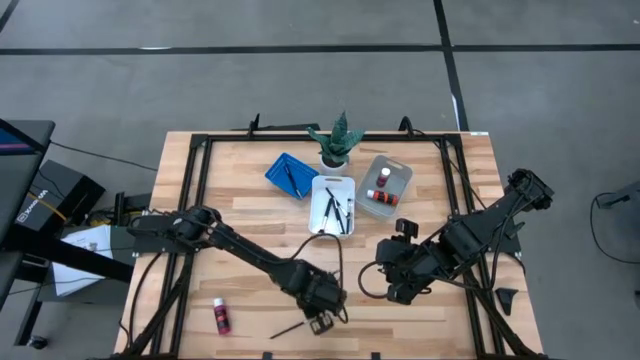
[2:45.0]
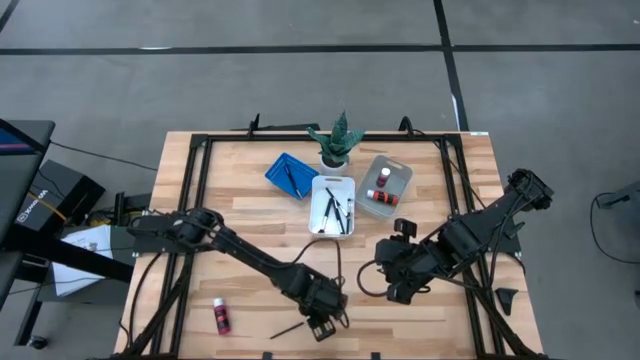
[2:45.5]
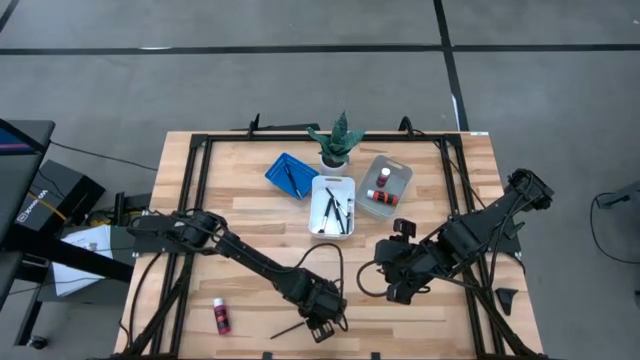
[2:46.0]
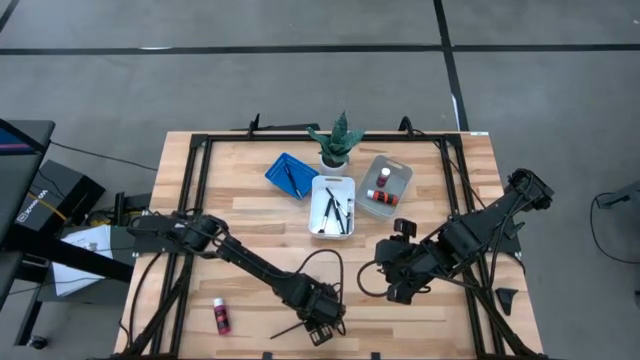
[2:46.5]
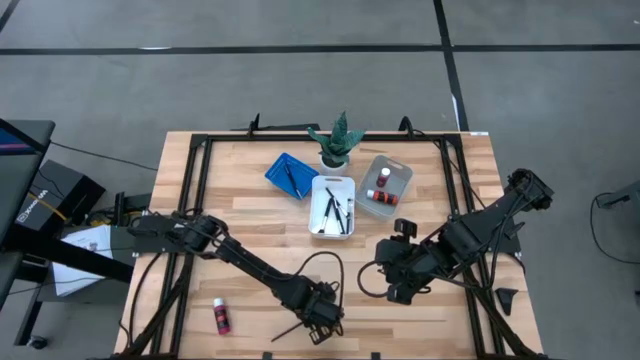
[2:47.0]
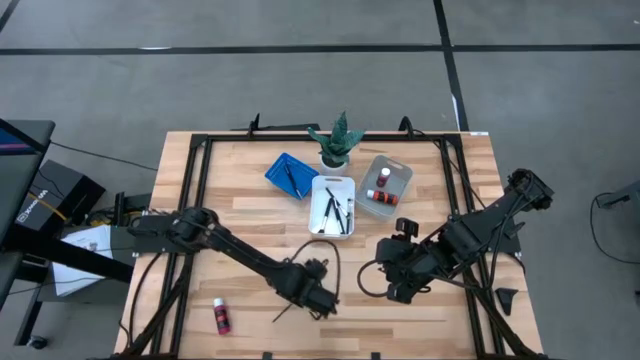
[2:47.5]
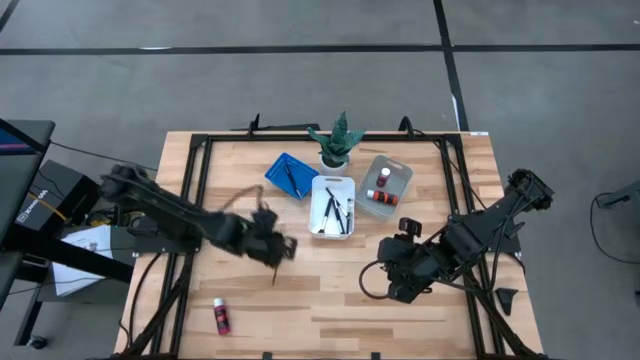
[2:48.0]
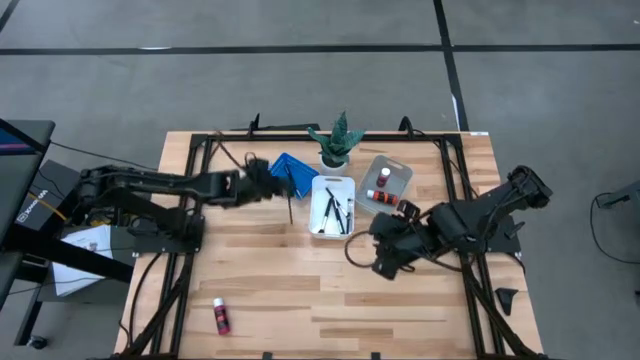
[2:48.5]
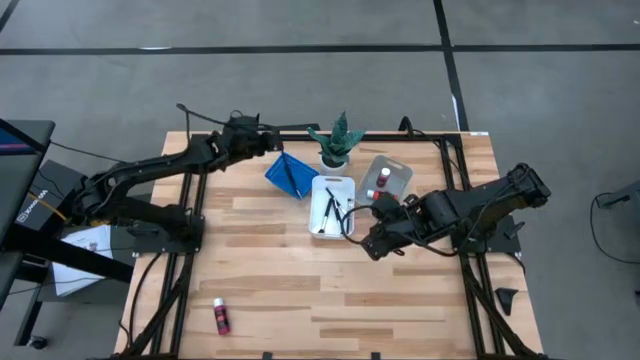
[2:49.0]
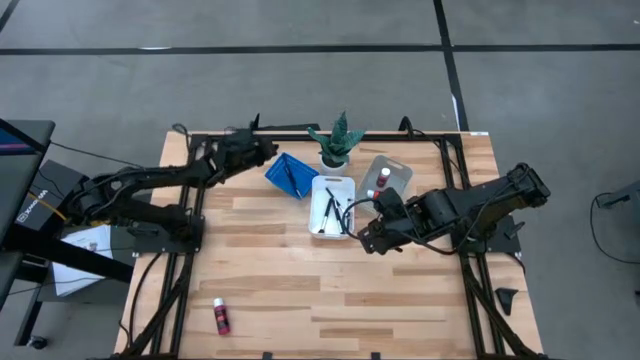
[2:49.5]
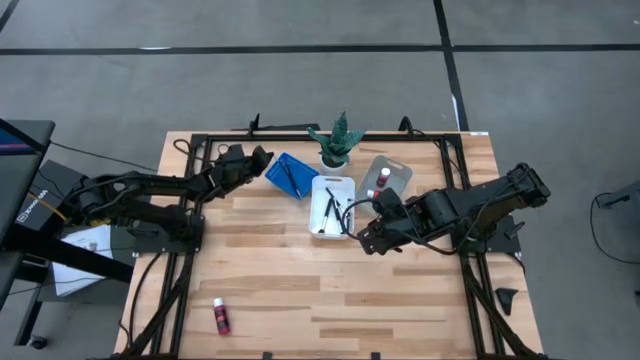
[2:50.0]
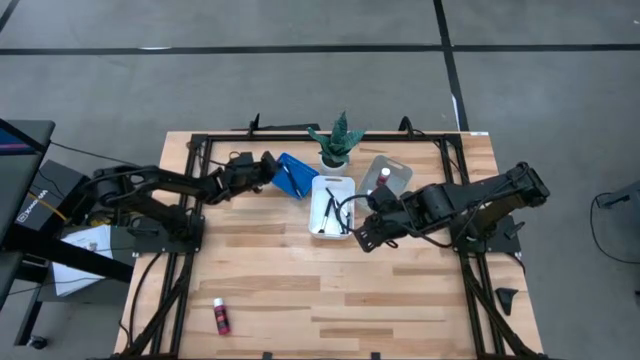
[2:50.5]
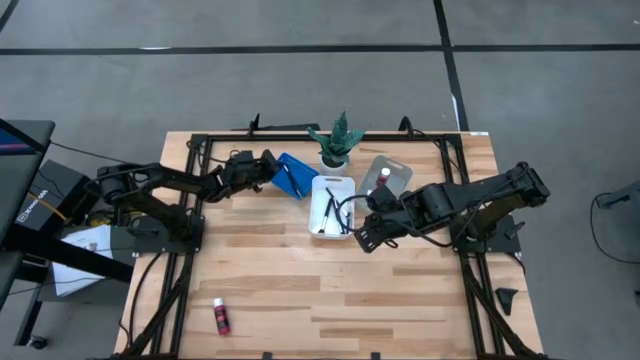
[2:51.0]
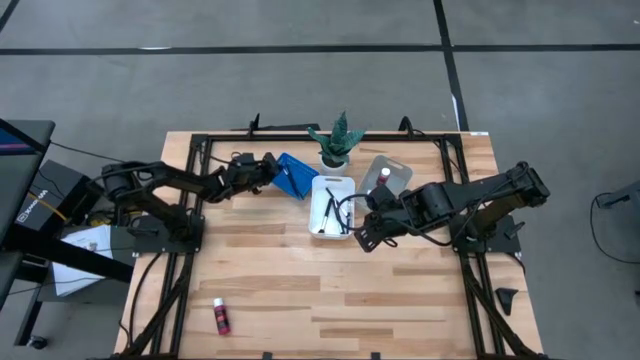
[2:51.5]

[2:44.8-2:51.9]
Task: Pick & Place Paint Supplies
Put the small black paint brush into the blue bin

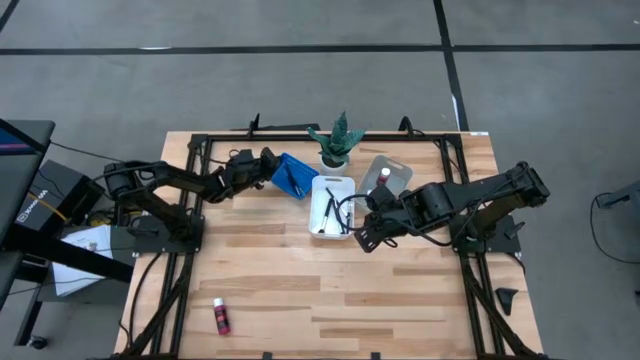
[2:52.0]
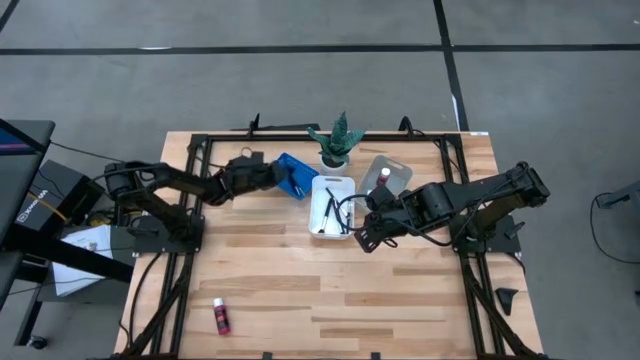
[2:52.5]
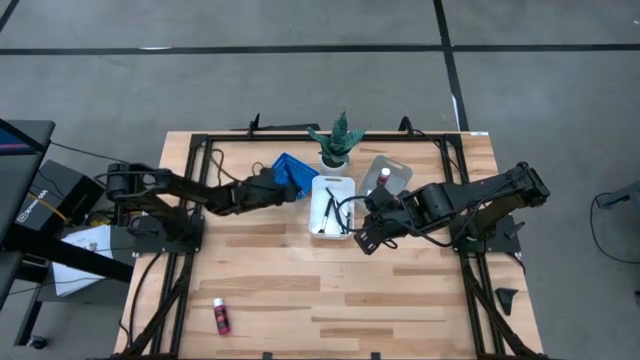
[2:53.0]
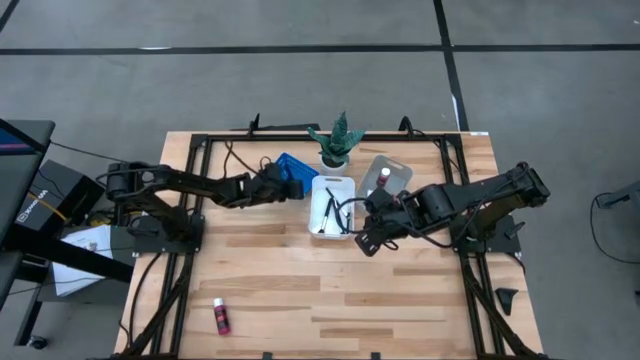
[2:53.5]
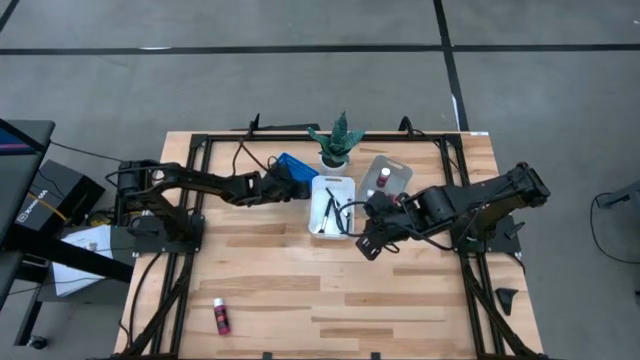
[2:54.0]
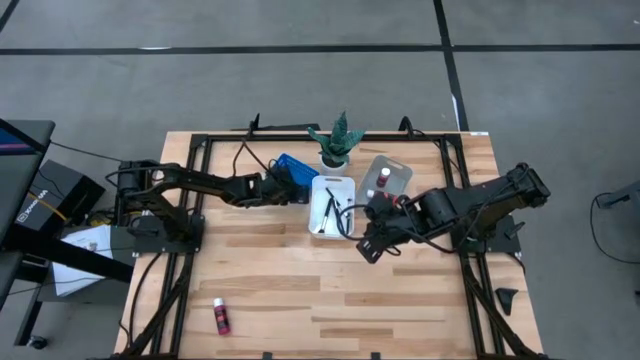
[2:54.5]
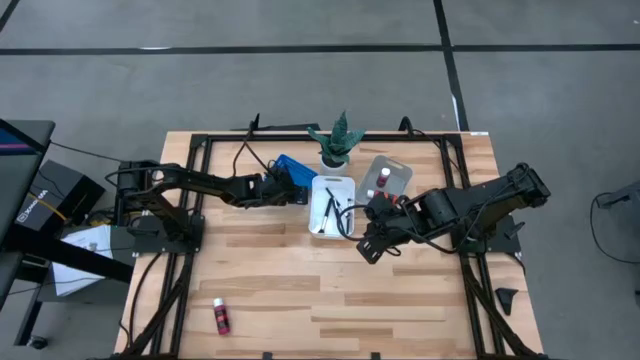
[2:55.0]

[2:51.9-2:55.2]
Adjust the small gold paint brush in the blue bin

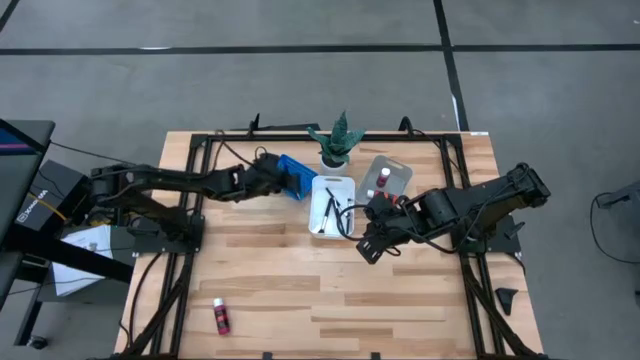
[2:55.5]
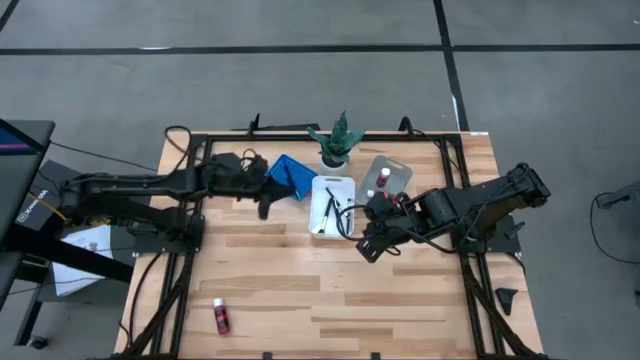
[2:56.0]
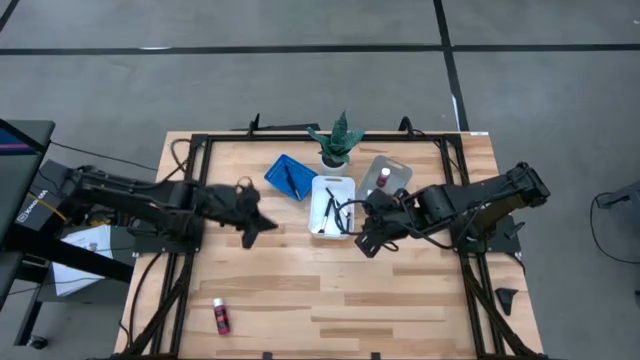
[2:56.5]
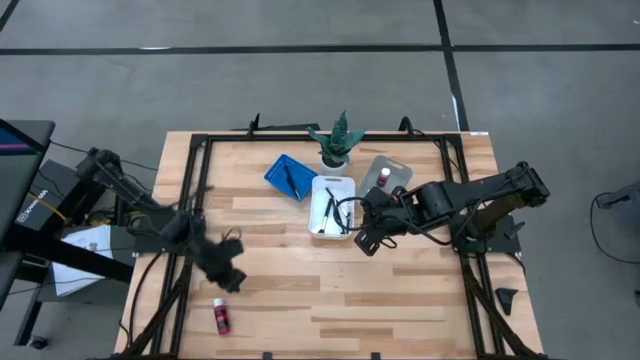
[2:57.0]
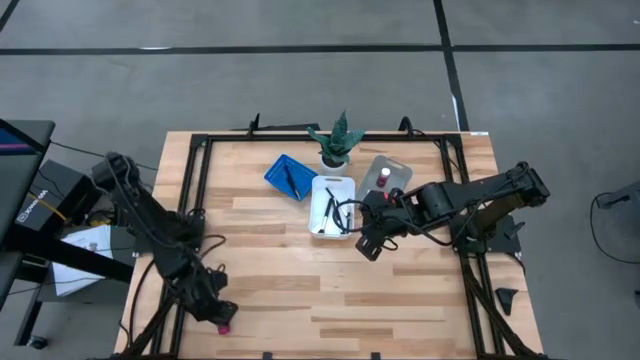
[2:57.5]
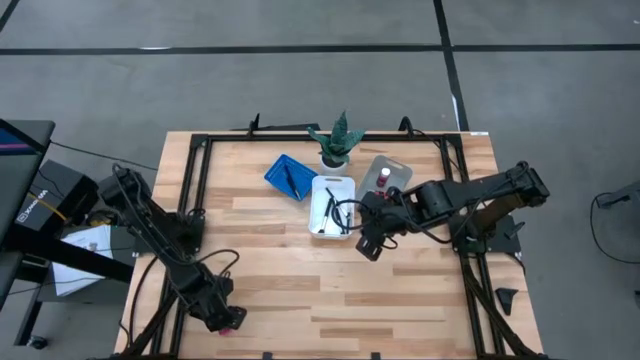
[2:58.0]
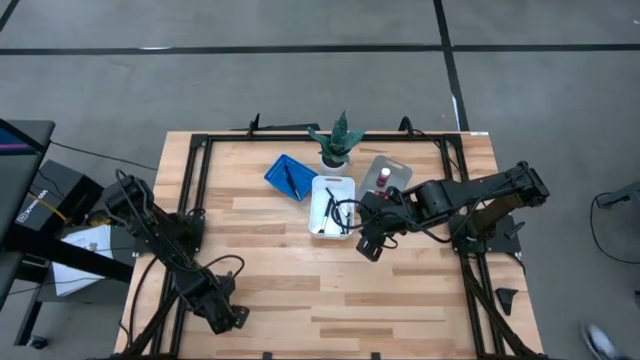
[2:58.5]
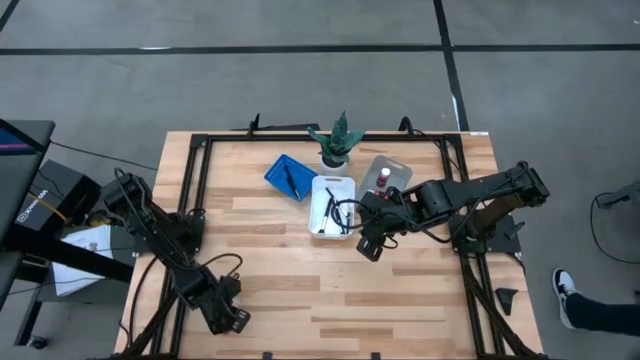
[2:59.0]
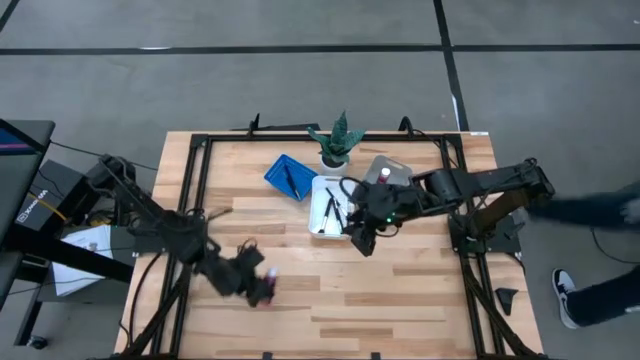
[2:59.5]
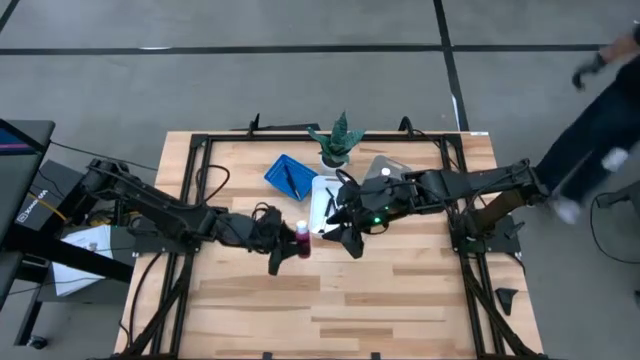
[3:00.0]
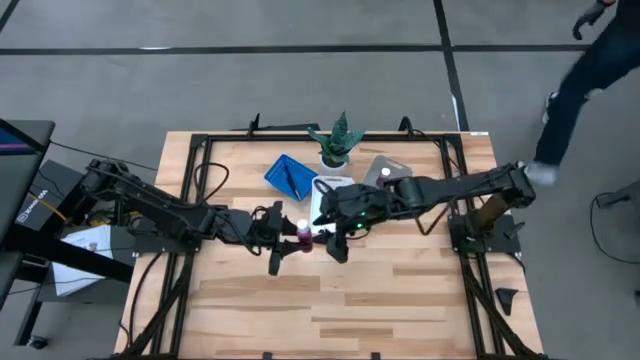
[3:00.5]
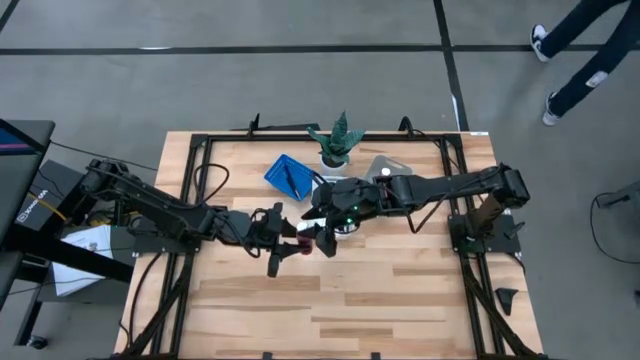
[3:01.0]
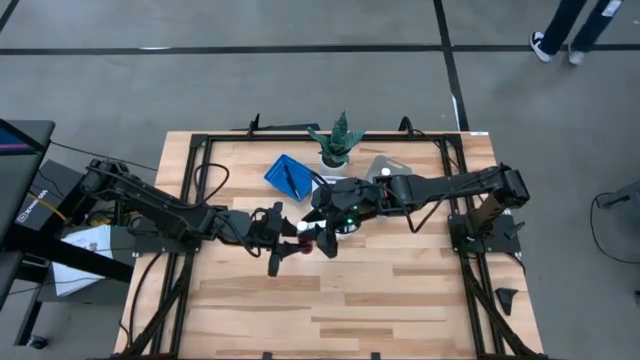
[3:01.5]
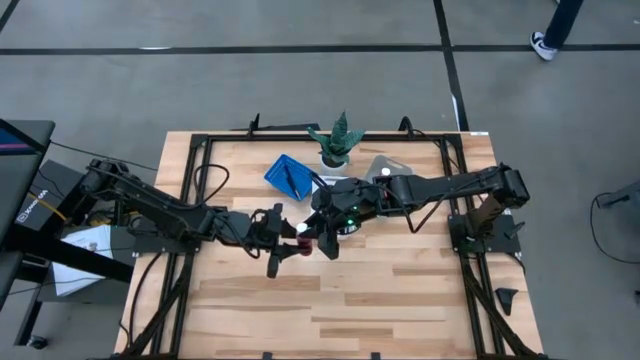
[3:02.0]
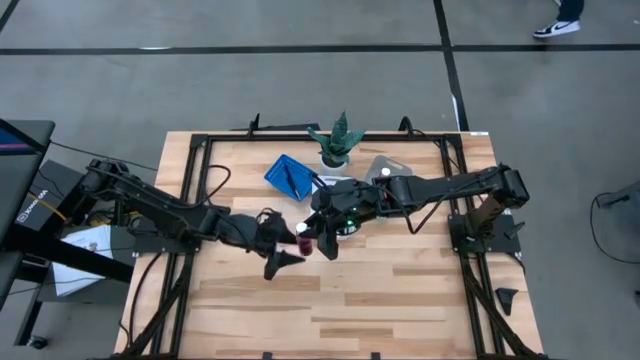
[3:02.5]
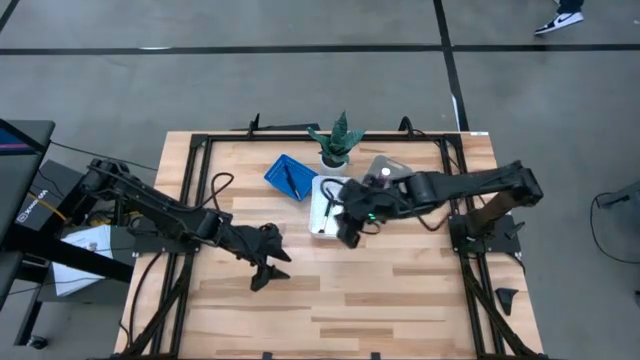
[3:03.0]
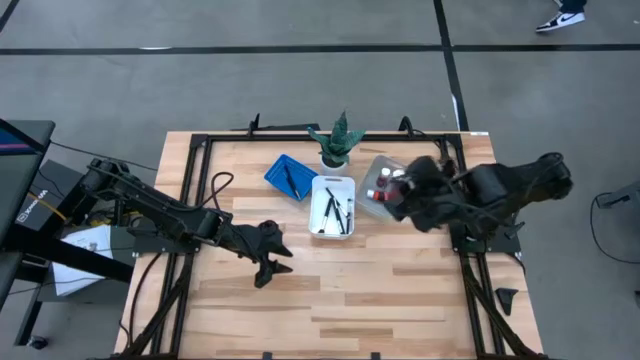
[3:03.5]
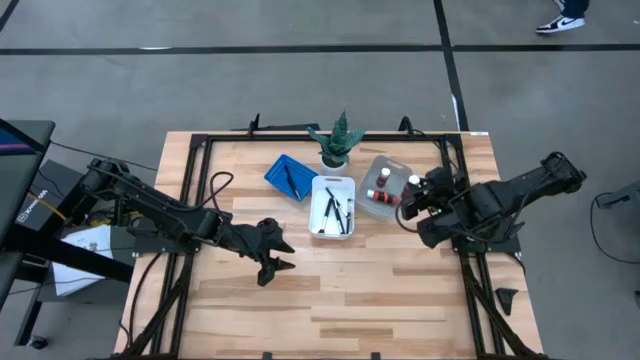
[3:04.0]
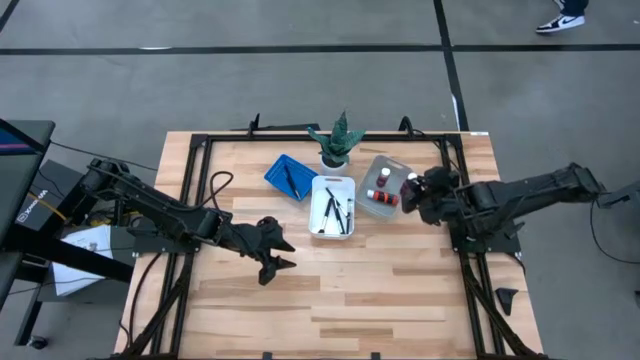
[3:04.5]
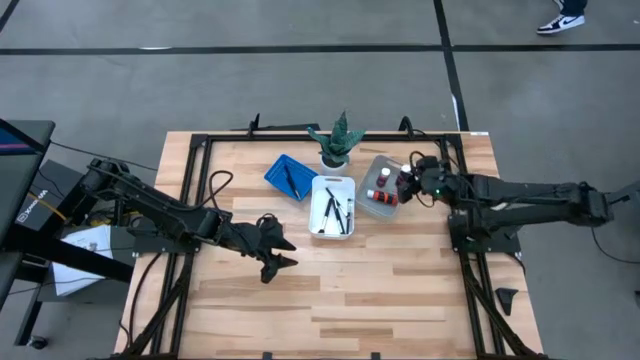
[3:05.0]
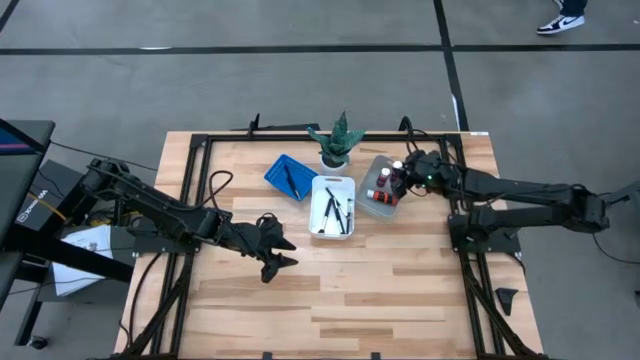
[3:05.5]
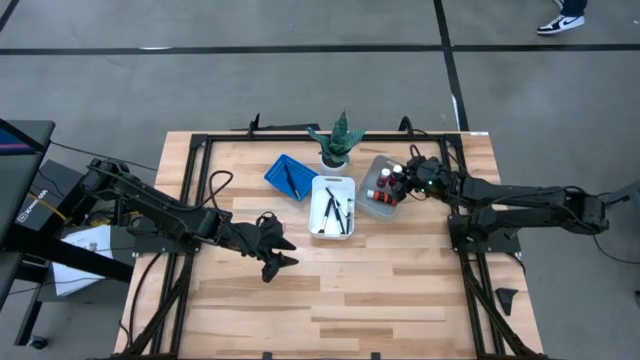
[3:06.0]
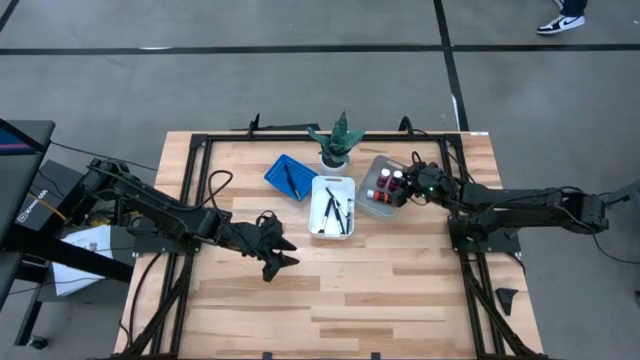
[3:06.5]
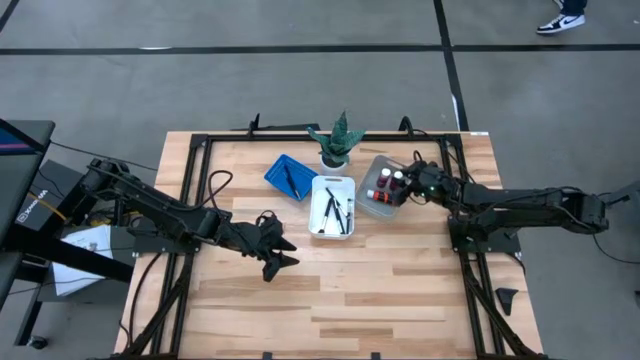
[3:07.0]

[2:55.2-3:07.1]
Put the pink paint bottle into the gray bin
